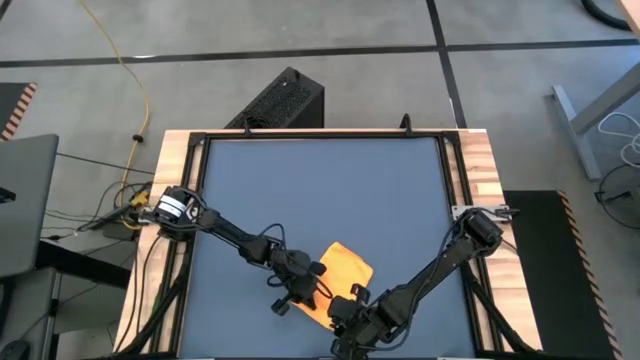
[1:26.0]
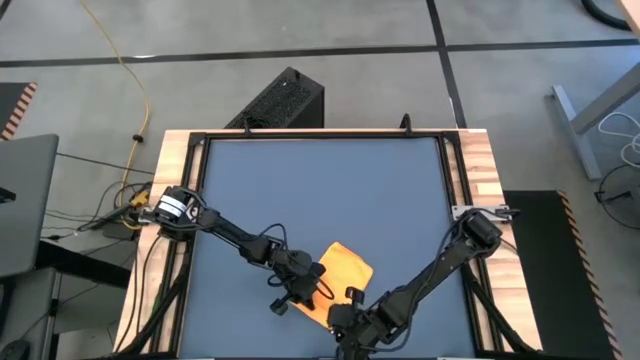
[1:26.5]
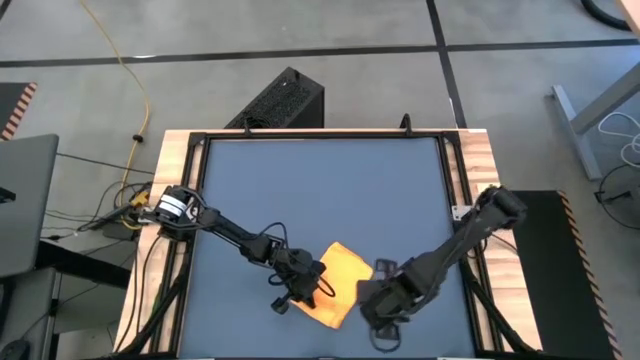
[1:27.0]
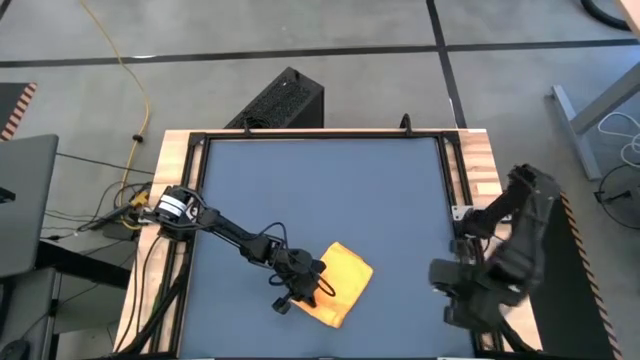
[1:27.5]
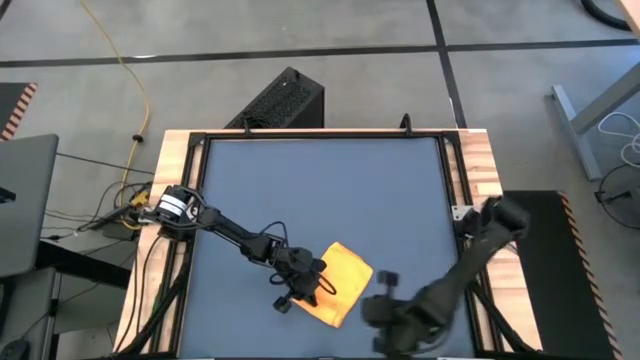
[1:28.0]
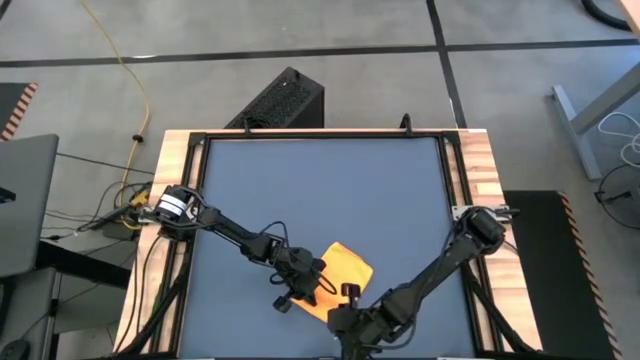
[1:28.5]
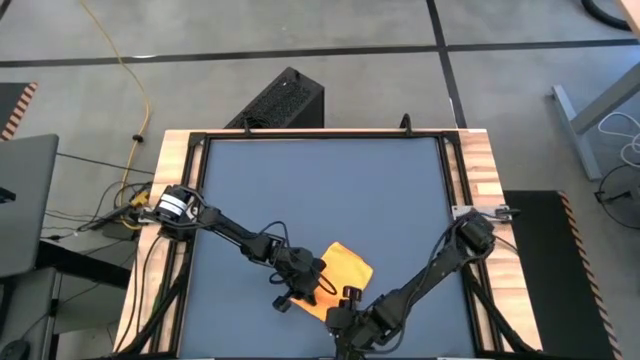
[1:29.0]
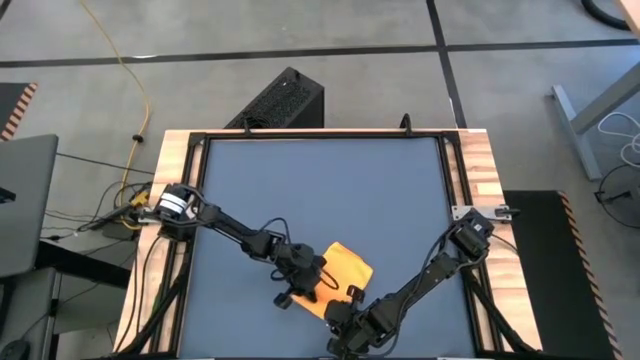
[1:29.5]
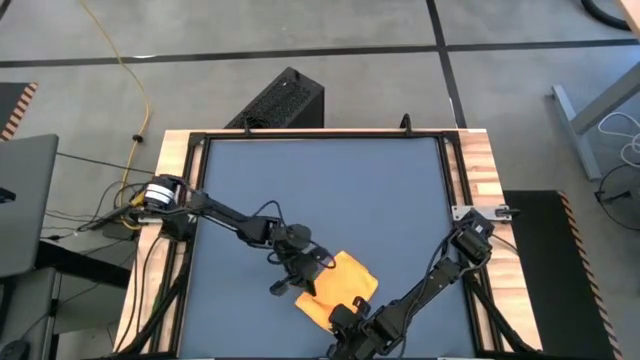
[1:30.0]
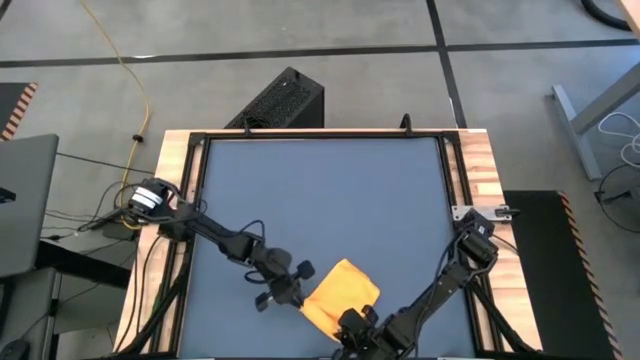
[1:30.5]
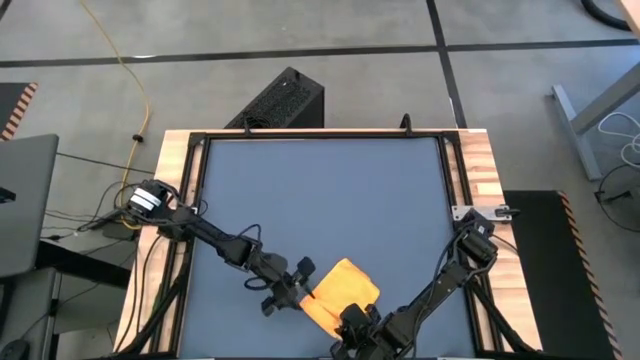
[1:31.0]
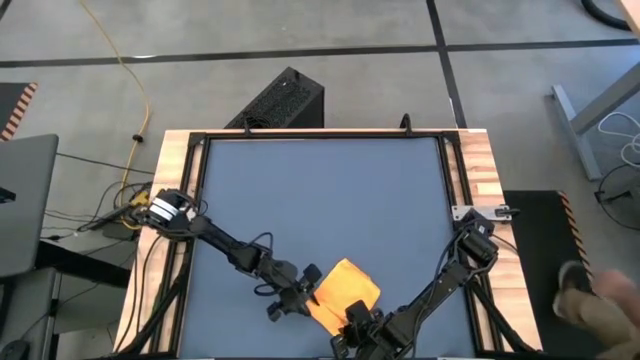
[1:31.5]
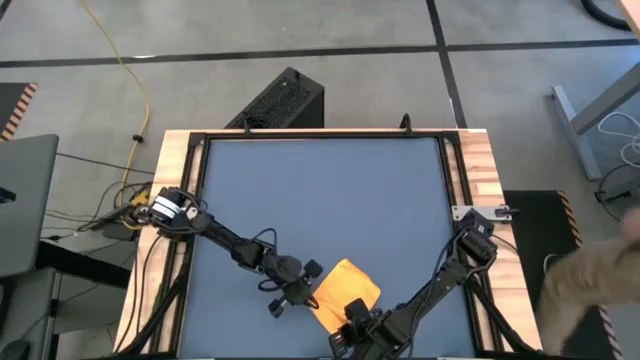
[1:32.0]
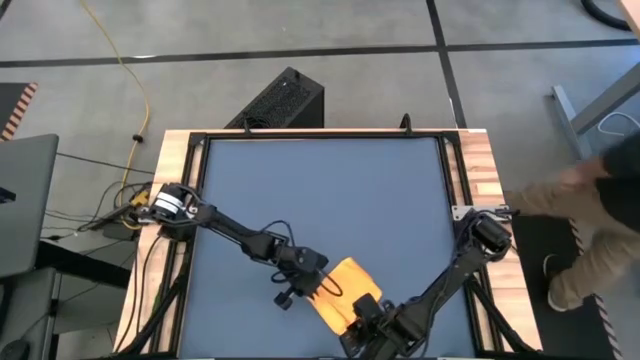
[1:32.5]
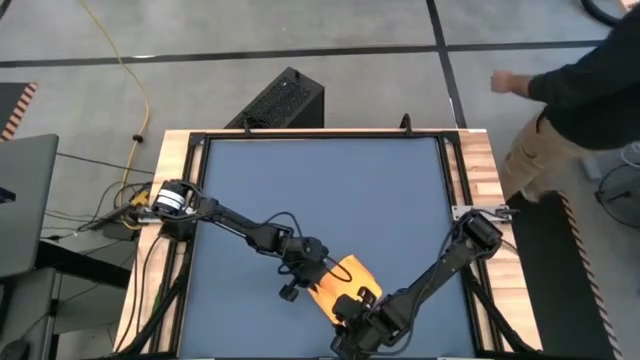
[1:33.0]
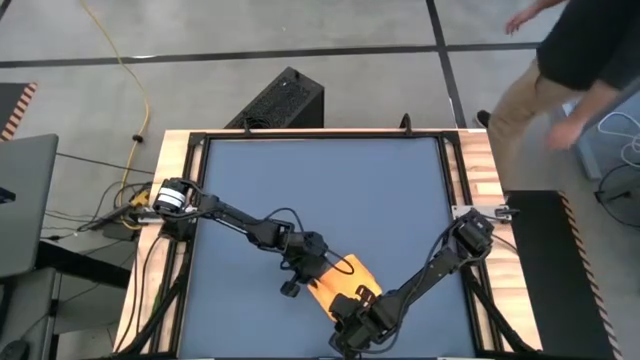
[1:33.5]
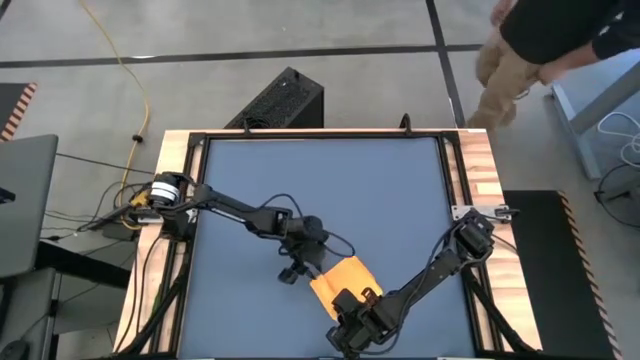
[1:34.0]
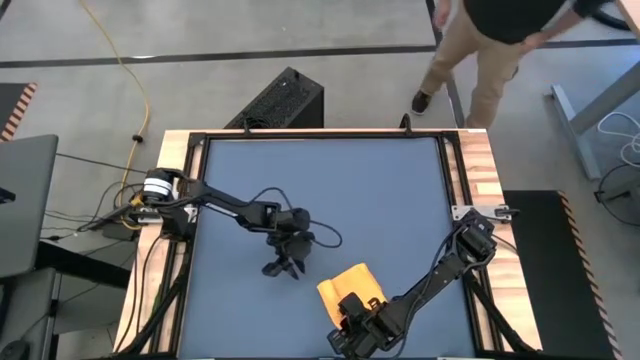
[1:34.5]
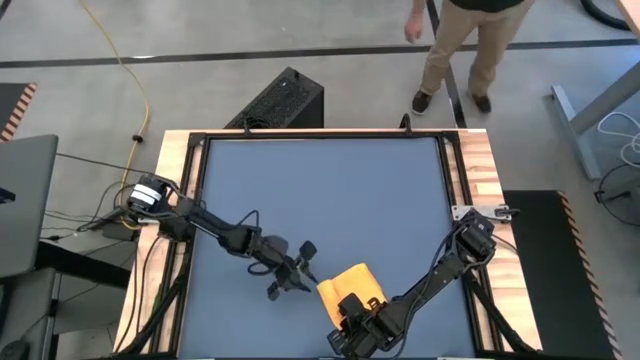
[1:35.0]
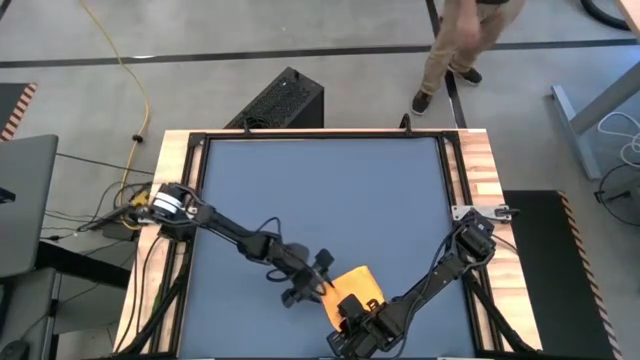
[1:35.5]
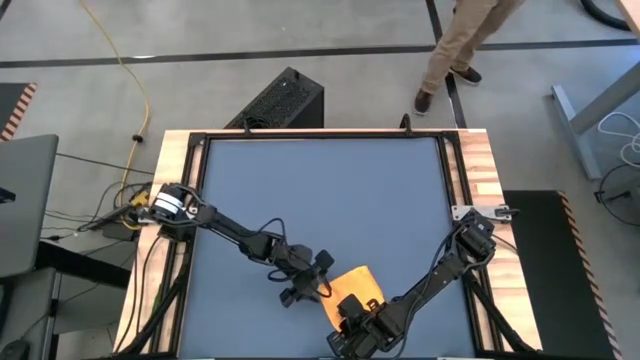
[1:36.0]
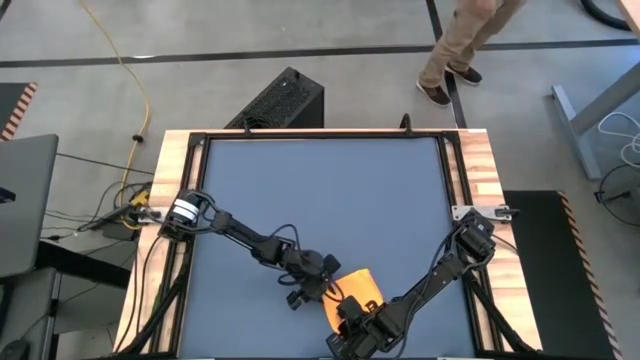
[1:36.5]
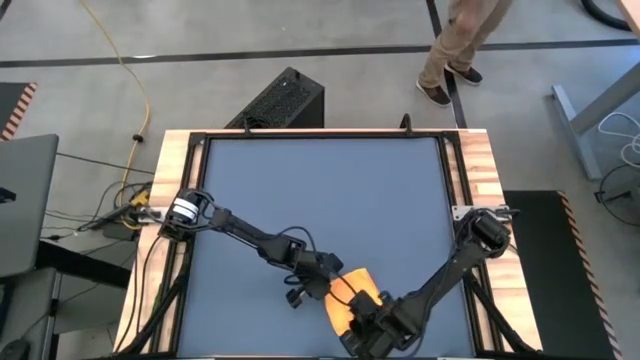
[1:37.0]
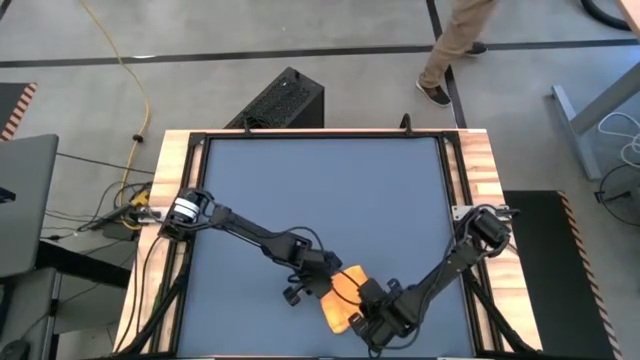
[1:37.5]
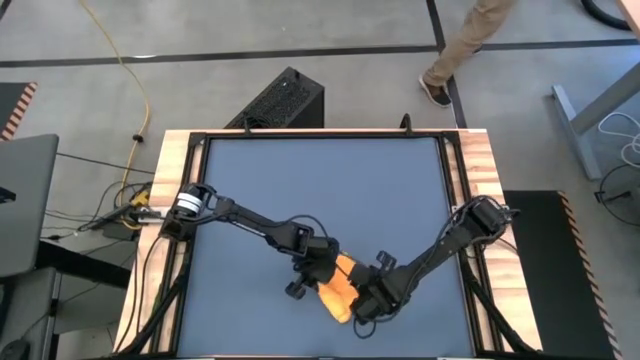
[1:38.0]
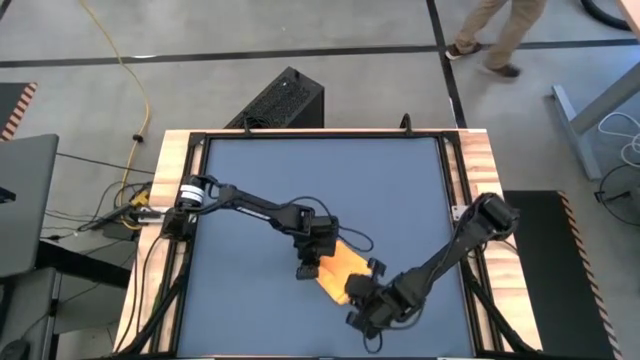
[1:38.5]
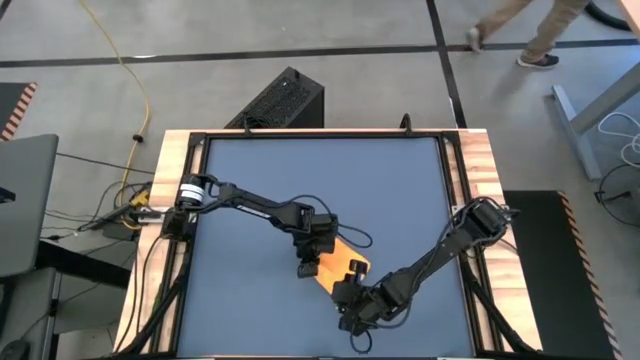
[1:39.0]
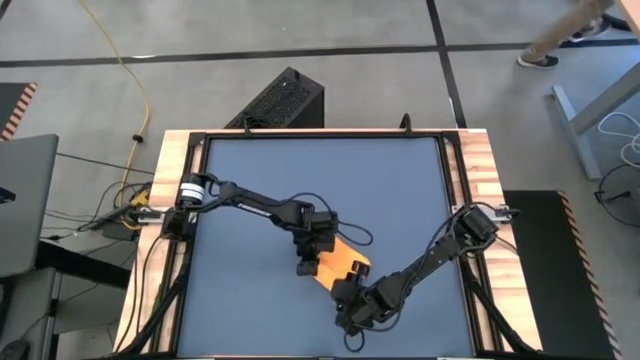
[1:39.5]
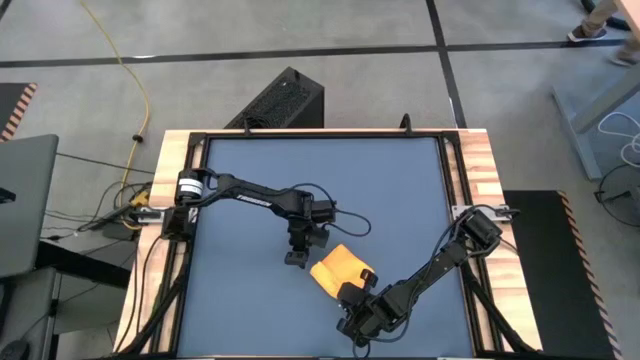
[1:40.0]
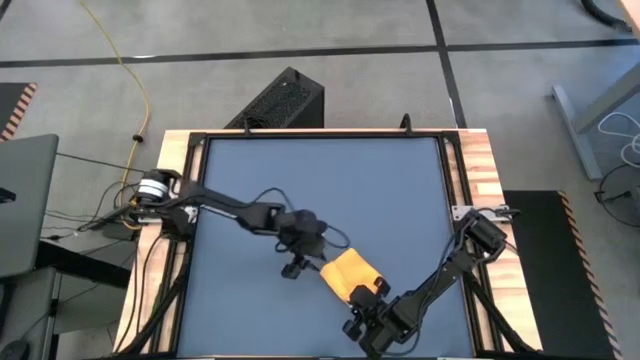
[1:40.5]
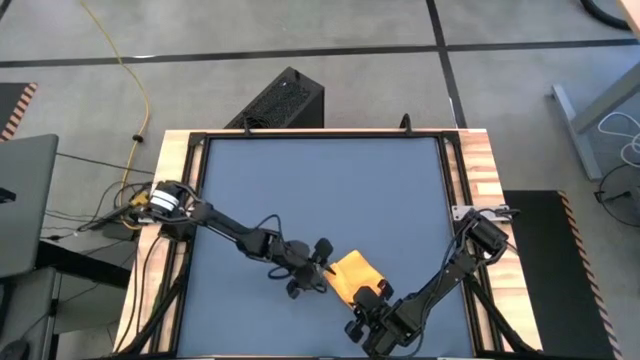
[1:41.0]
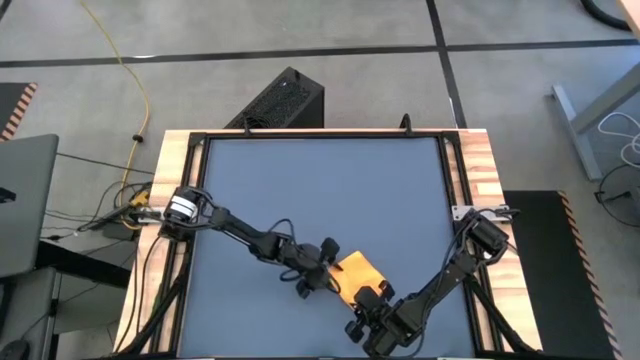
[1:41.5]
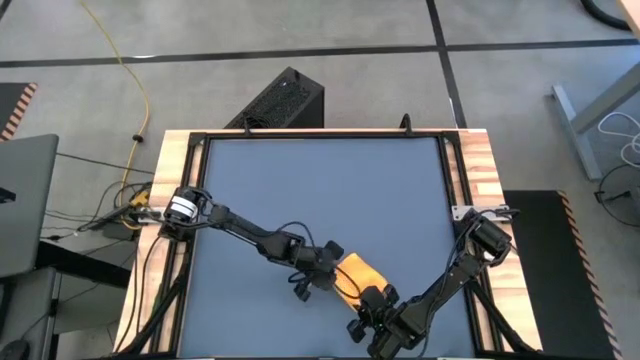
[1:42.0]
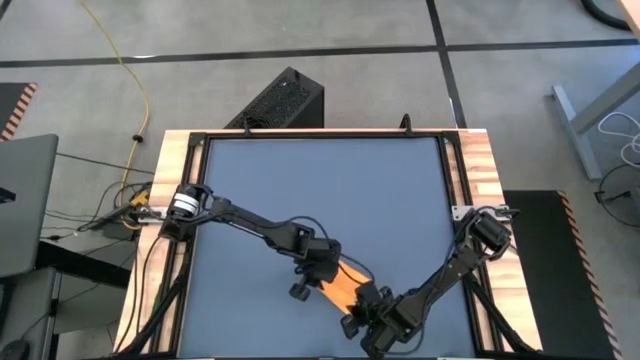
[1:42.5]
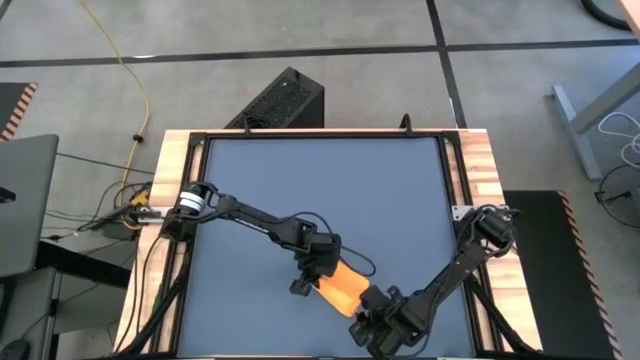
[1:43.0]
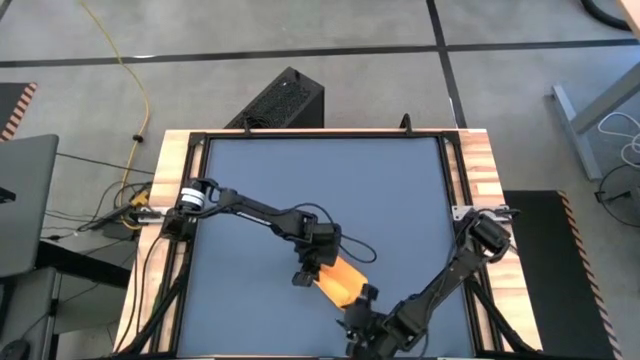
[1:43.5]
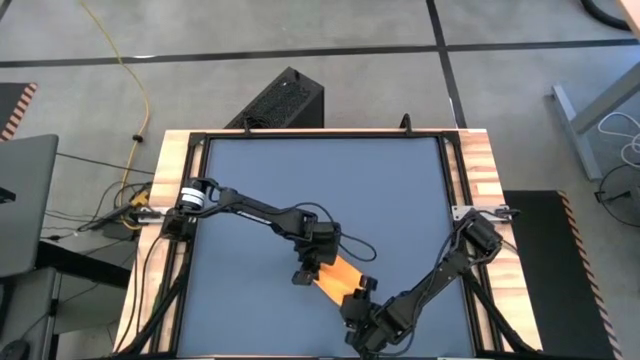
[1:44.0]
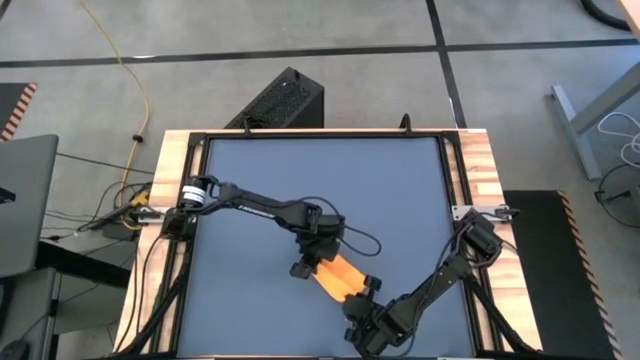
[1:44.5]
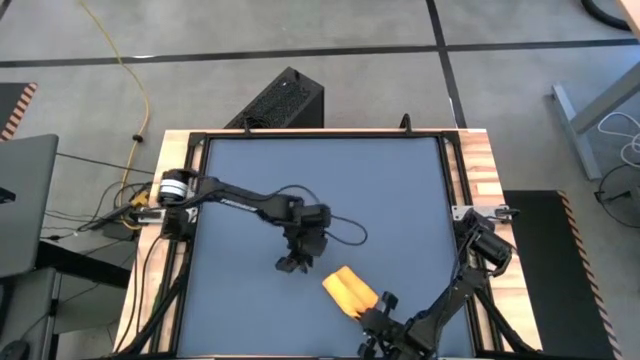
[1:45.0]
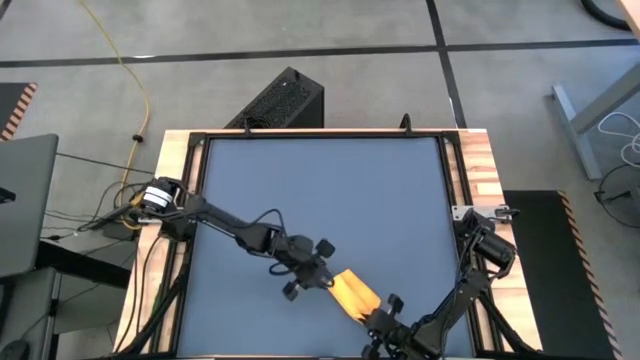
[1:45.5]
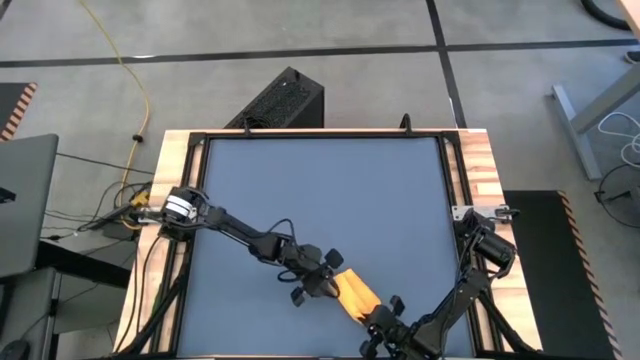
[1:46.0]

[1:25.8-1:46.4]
Task: Roll towel into tight, uniform cylinder
Roll the orange microfiber cloth
